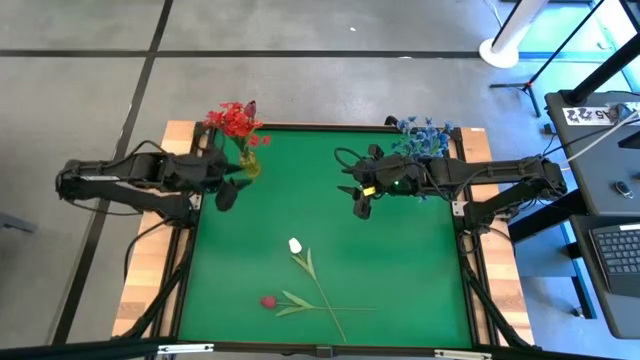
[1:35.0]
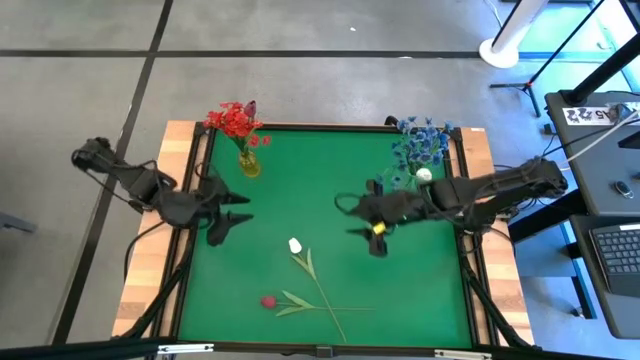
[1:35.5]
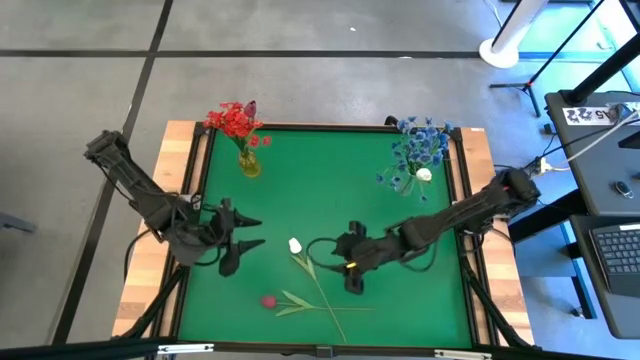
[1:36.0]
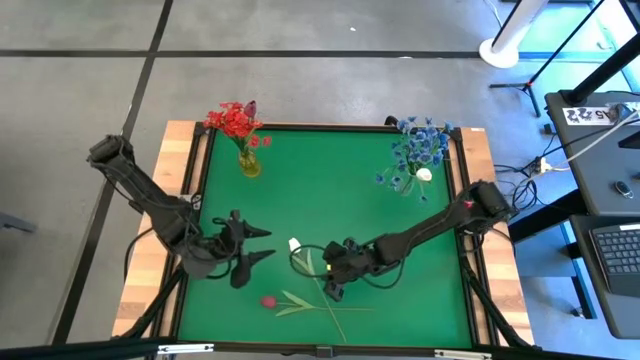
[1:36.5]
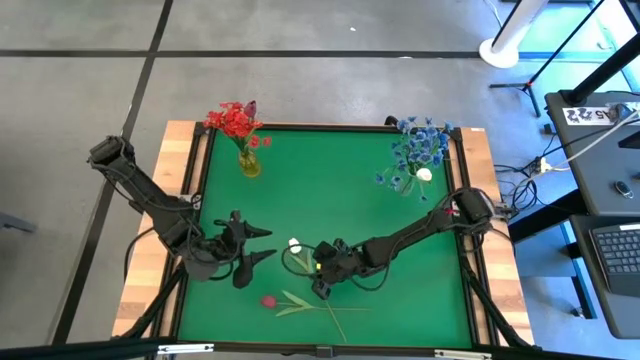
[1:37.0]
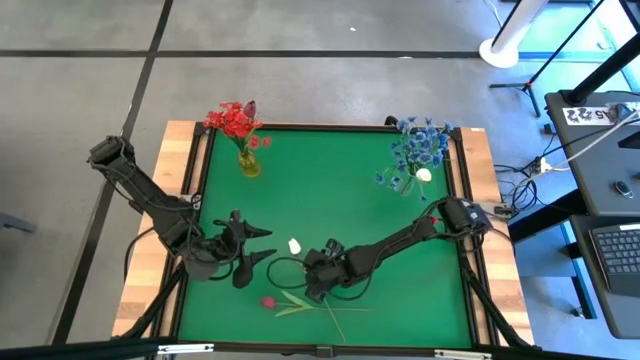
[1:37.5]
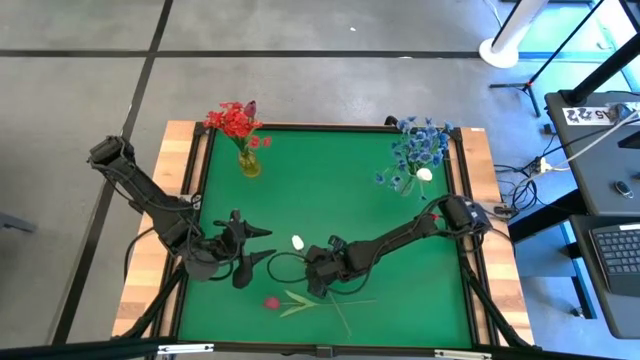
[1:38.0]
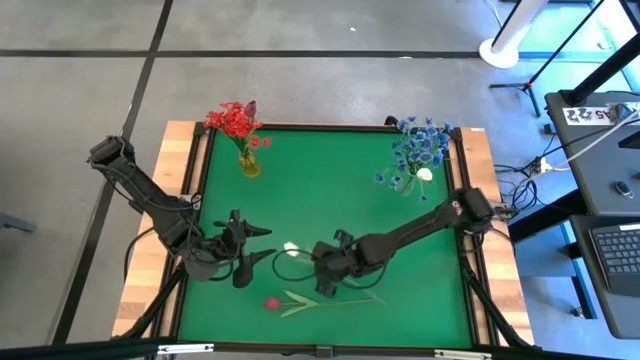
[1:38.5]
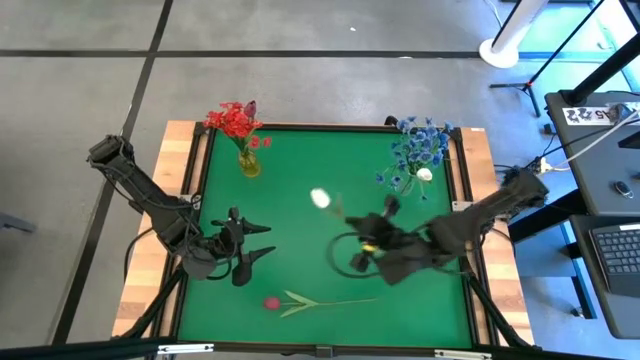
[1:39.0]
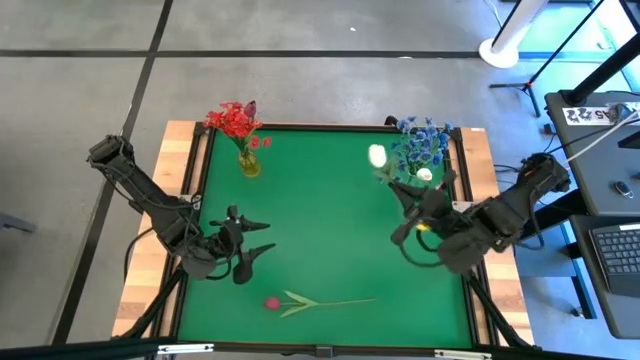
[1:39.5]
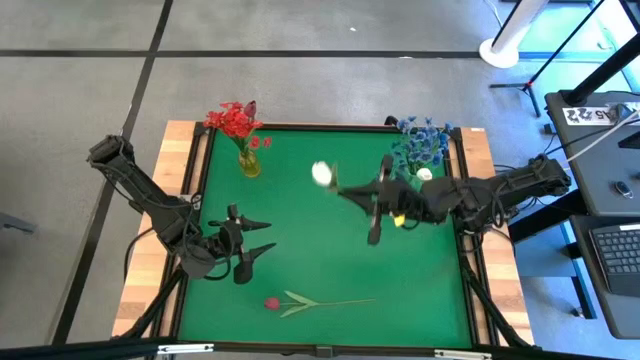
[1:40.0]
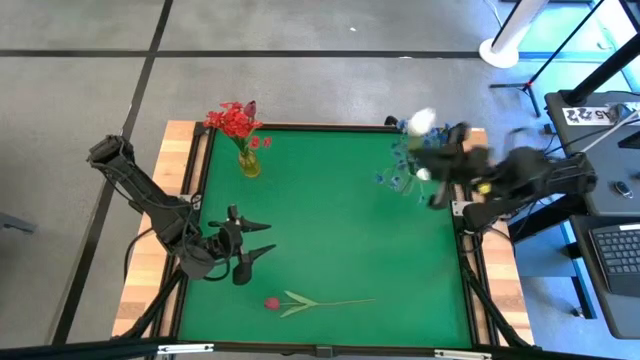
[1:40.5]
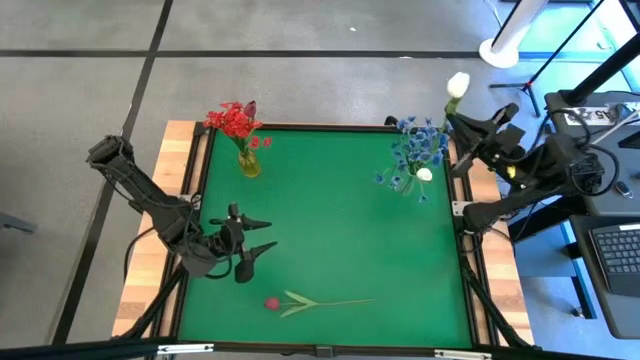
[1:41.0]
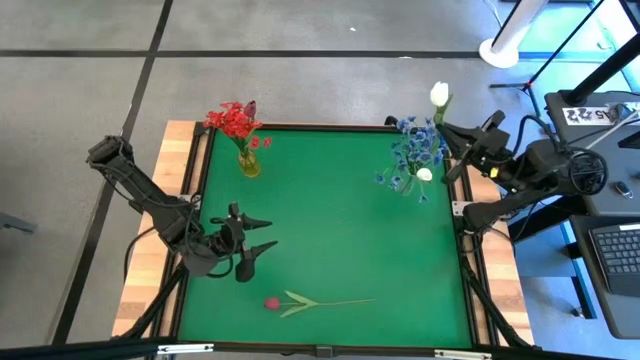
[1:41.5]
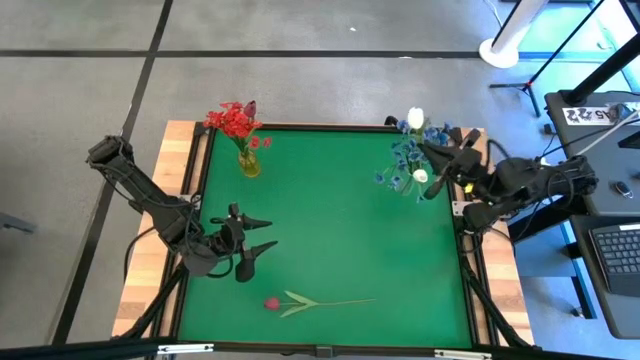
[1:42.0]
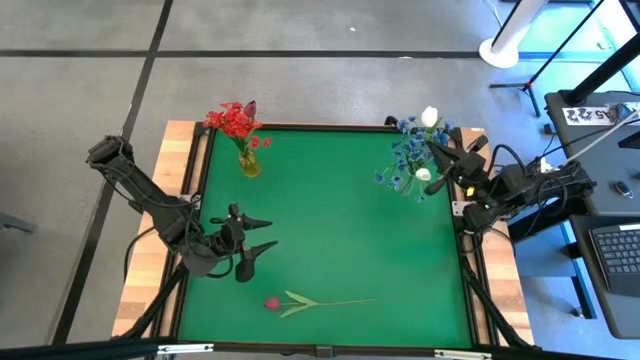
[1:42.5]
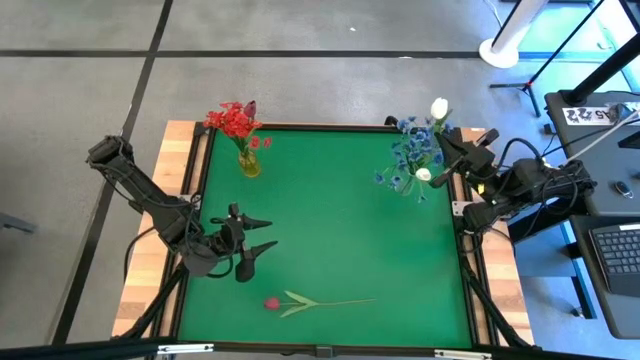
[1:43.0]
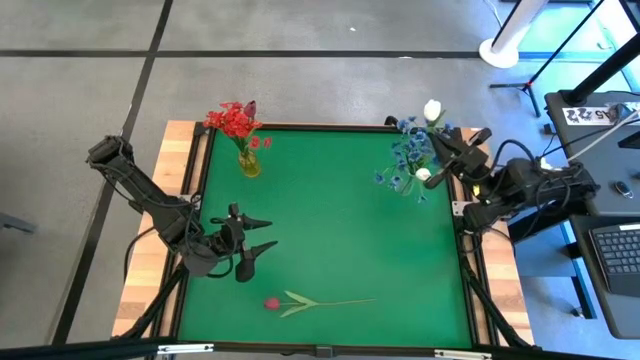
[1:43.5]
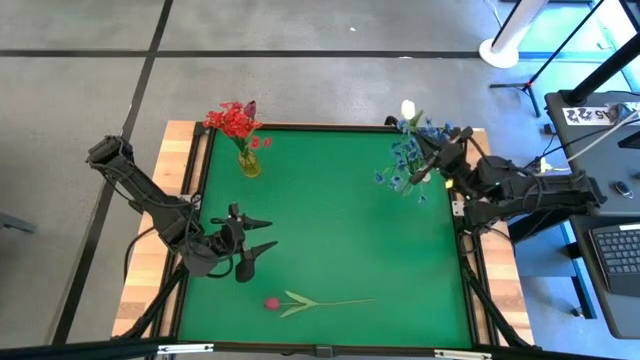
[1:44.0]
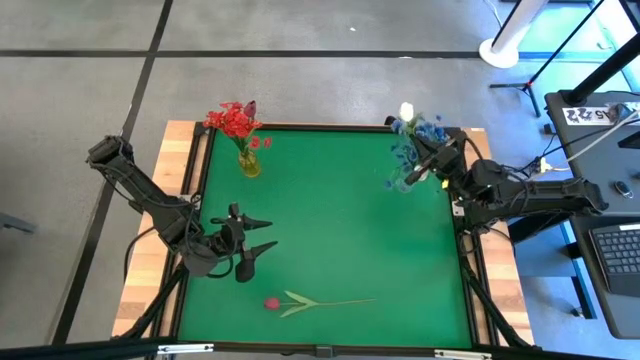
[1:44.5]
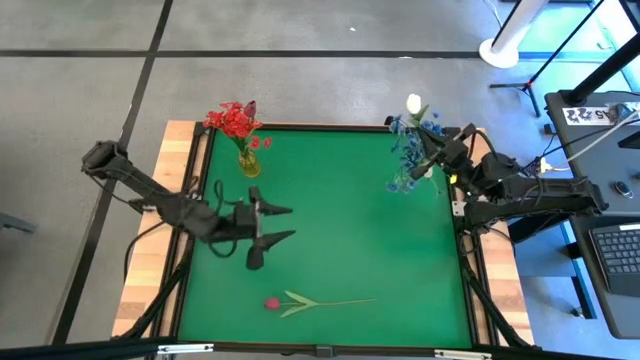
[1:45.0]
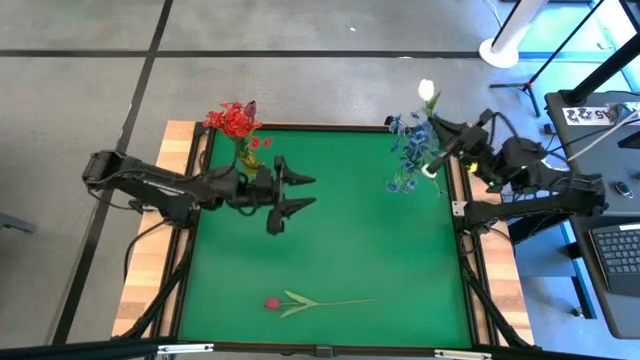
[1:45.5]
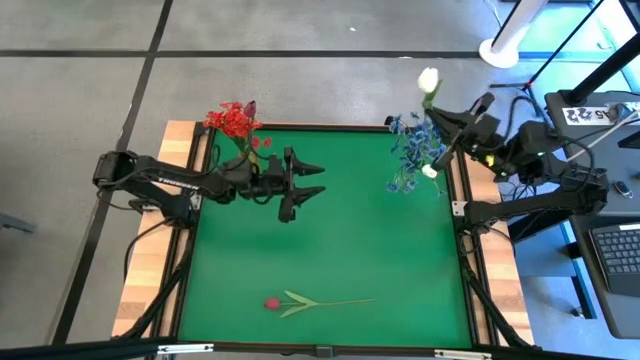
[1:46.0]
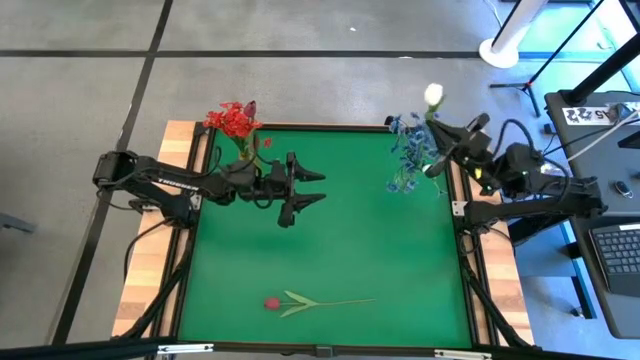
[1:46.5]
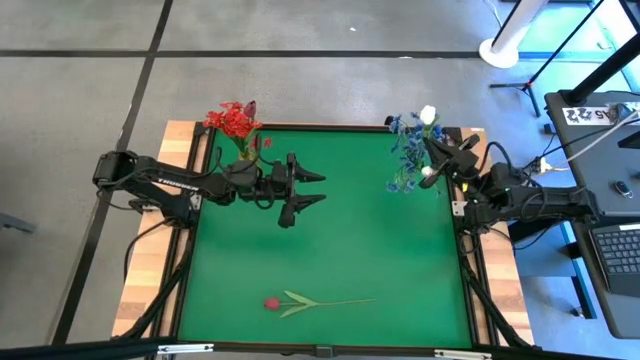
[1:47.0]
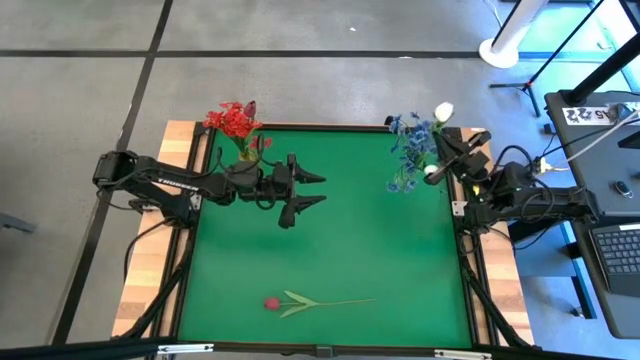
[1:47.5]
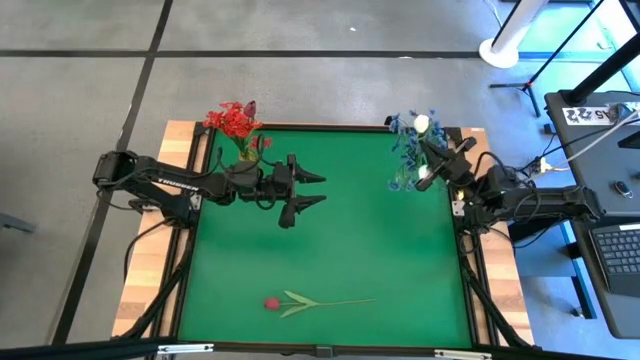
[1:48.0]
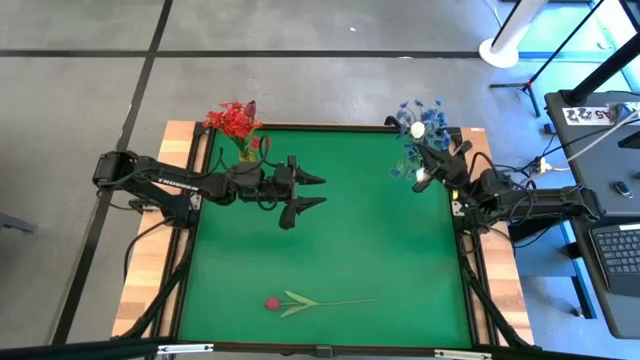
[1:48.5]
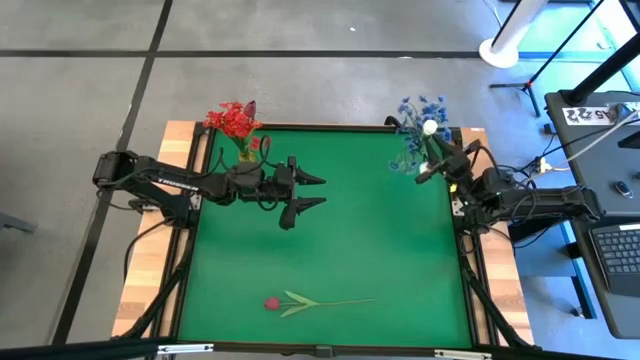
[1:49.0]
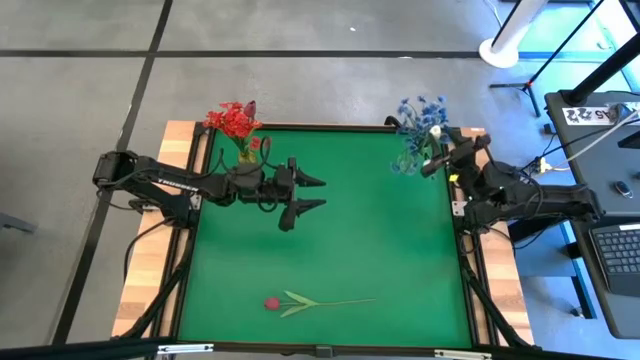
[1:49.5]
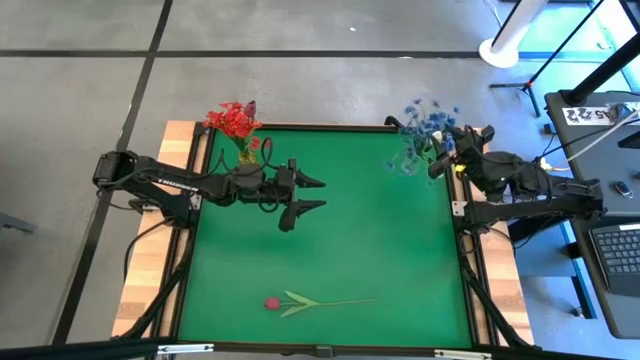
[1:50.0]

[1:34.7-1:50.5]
Task: Sort flowers into vase by color
Put the white flower into the transparent vase

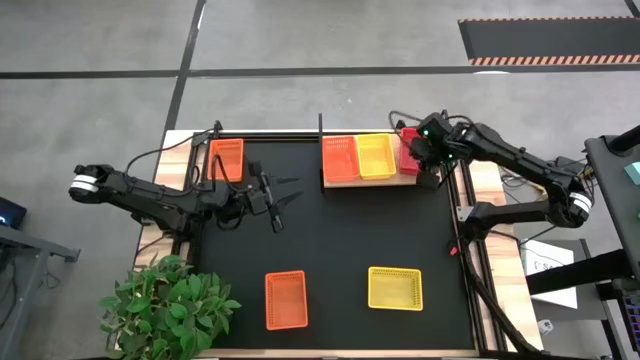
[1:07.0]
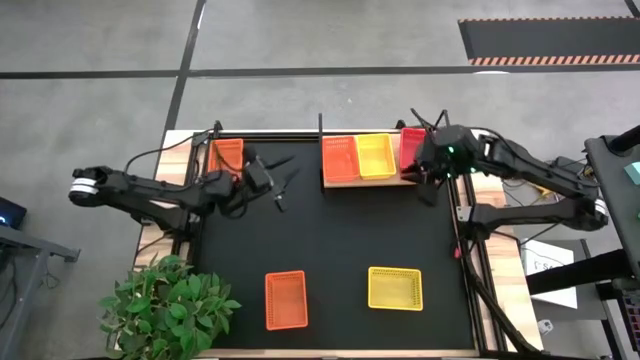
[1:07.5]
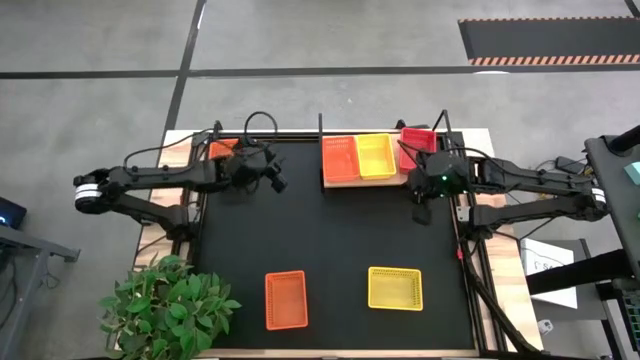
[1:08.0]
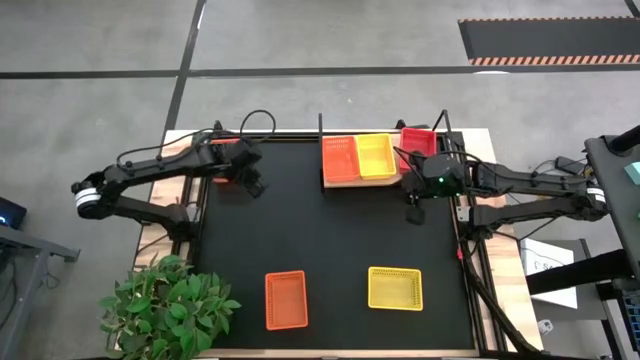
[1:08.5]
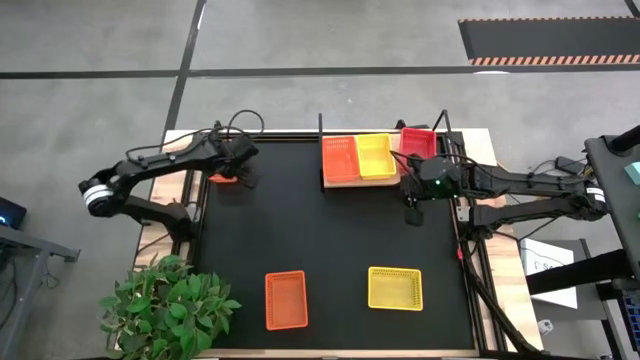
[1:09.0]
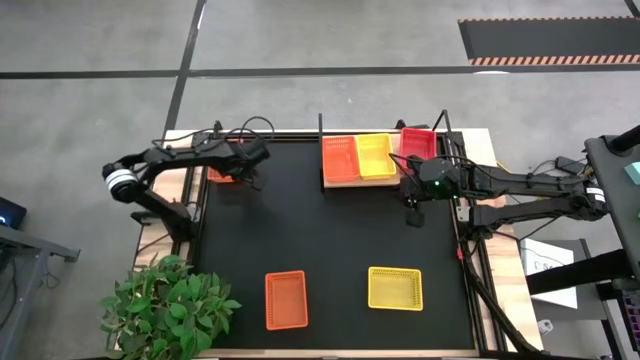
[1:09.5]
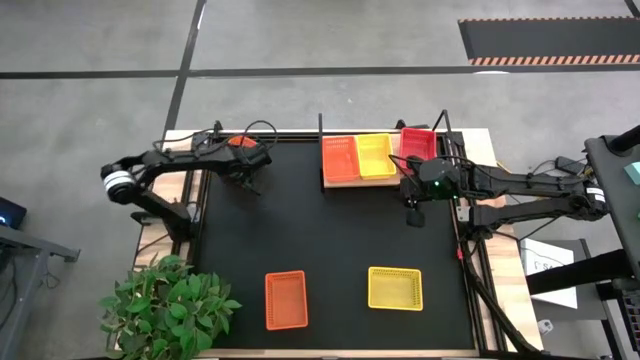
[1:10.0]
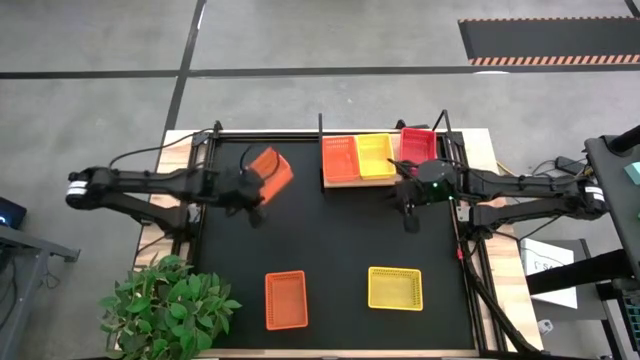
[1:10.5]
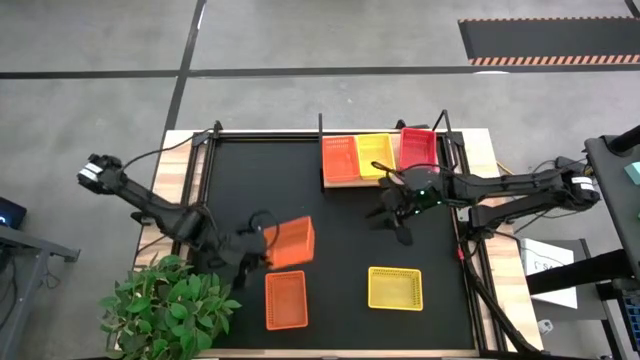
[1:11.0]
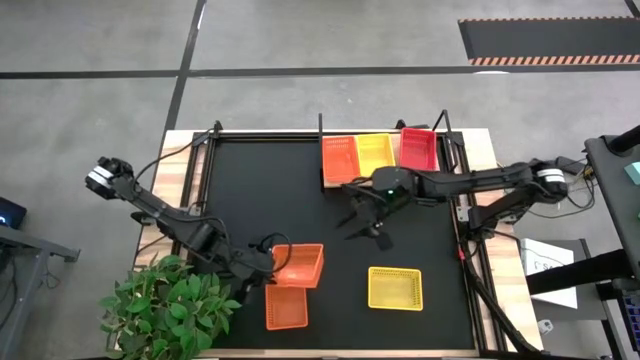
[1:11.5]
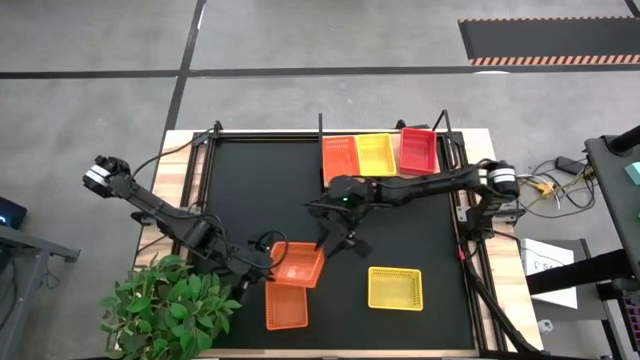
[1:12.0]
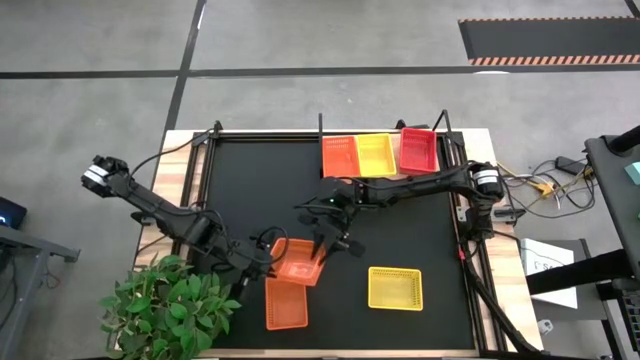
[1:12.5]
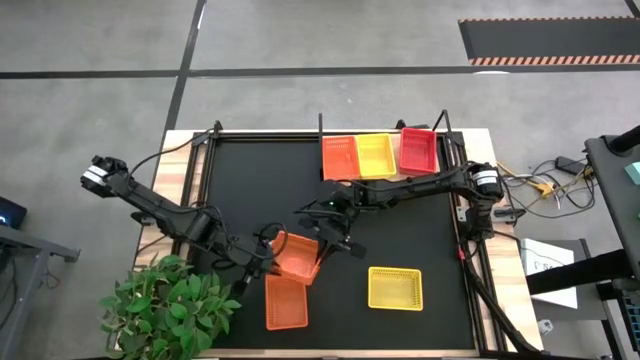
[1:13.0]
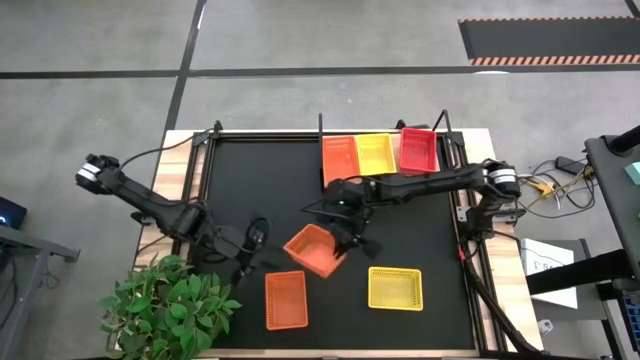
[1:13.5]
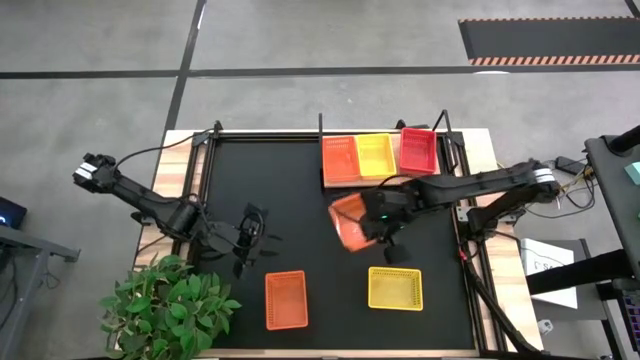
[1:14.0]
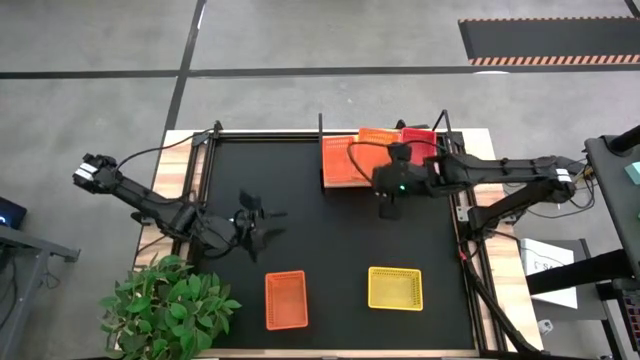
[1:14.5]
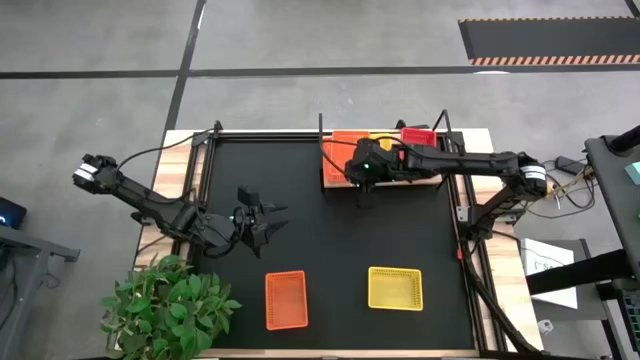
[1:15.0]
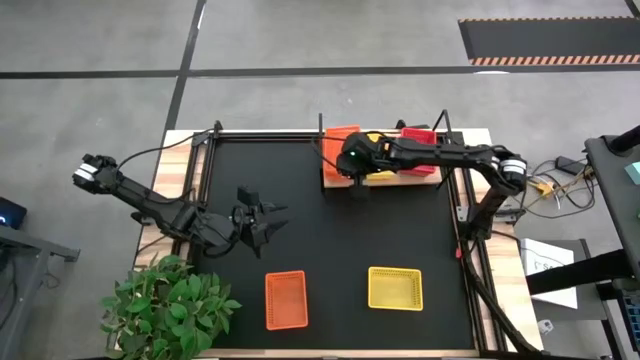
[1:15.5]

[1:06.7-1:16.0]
Task: Stack baskets on shelf by color
Stack the top orange bin on the orange bin on the shelf
